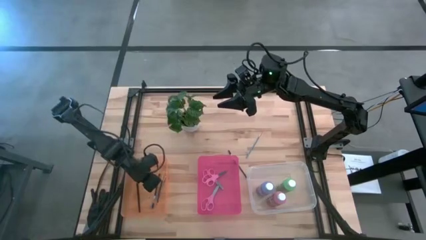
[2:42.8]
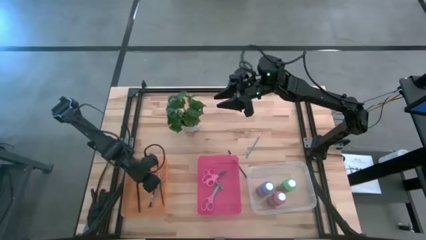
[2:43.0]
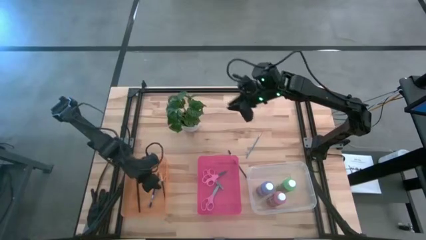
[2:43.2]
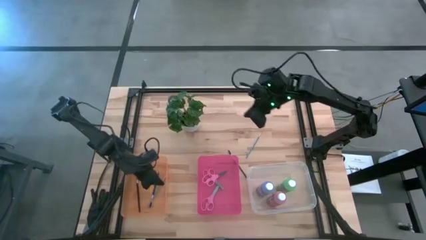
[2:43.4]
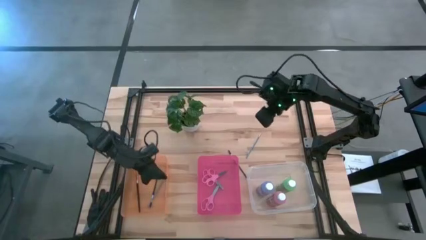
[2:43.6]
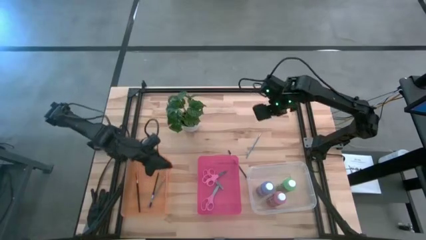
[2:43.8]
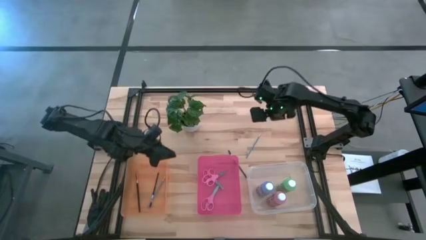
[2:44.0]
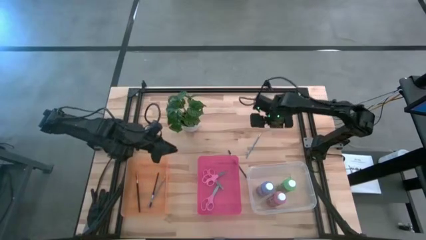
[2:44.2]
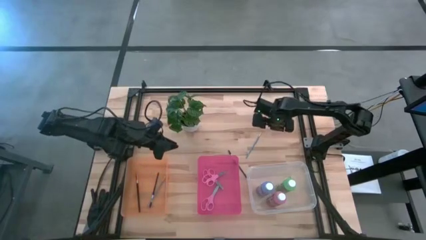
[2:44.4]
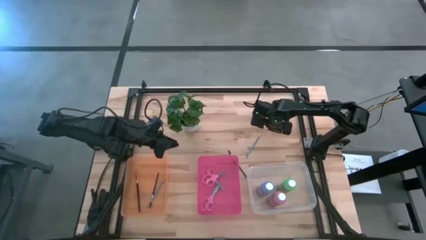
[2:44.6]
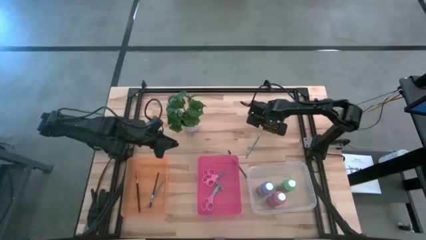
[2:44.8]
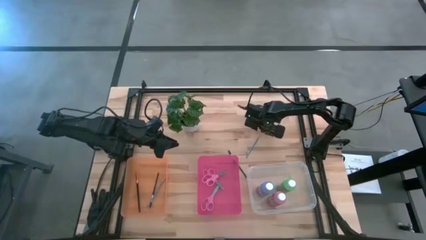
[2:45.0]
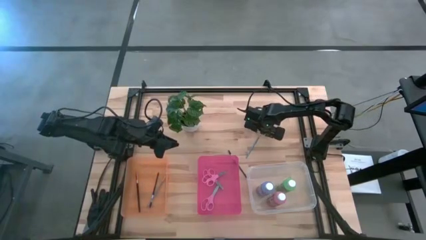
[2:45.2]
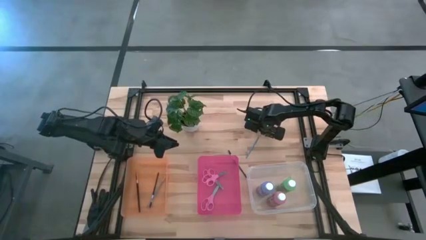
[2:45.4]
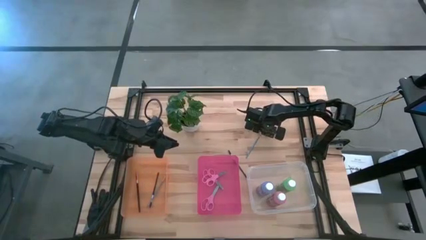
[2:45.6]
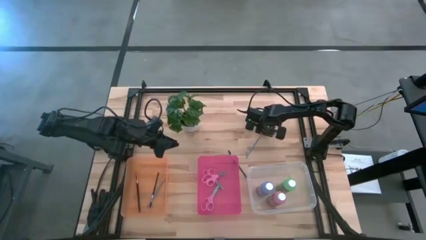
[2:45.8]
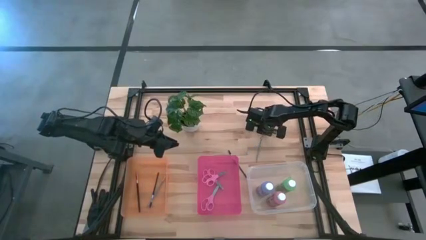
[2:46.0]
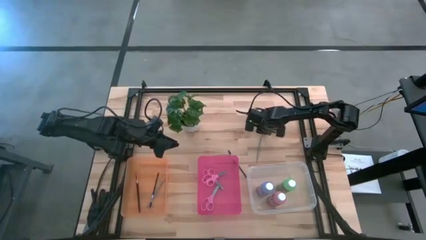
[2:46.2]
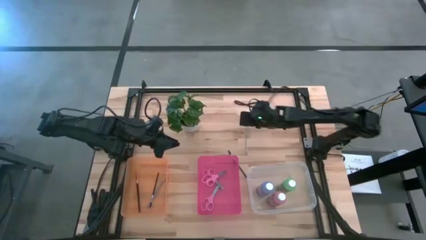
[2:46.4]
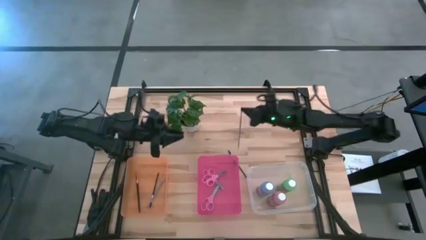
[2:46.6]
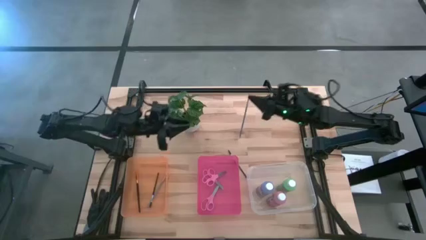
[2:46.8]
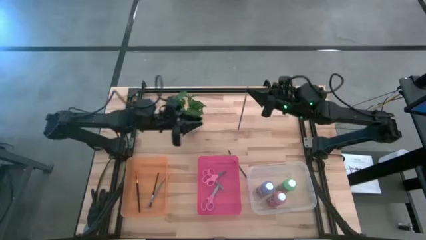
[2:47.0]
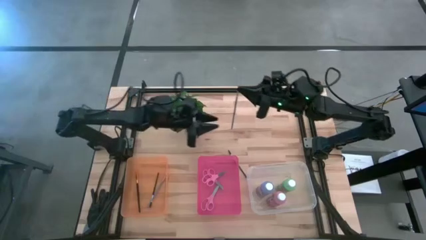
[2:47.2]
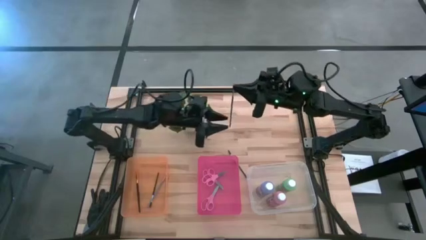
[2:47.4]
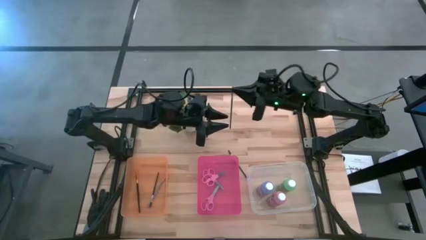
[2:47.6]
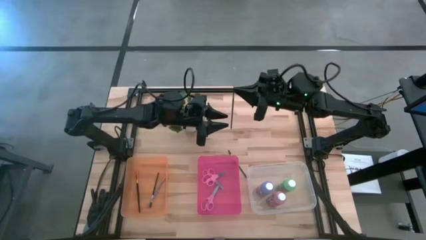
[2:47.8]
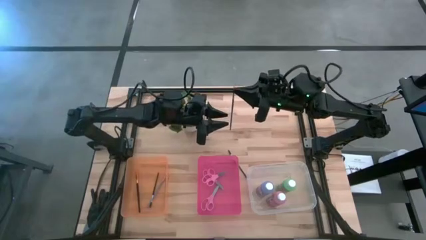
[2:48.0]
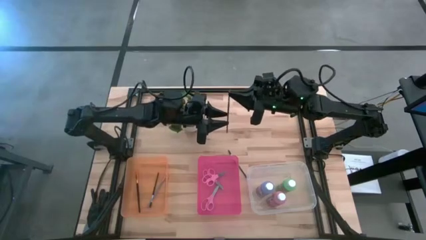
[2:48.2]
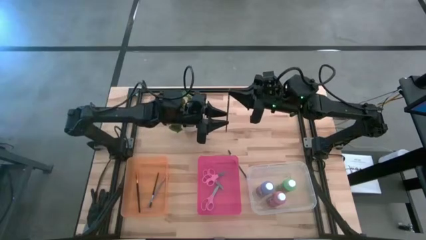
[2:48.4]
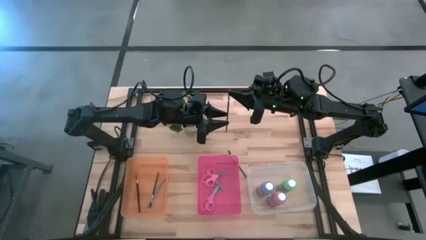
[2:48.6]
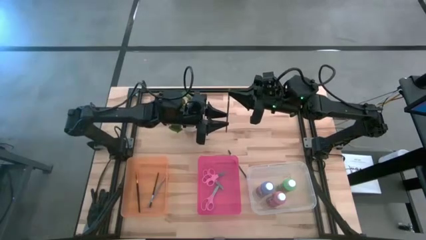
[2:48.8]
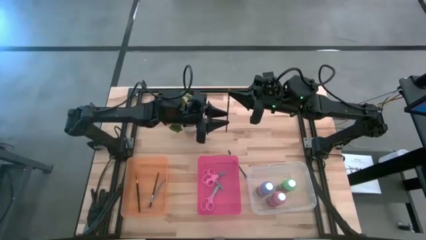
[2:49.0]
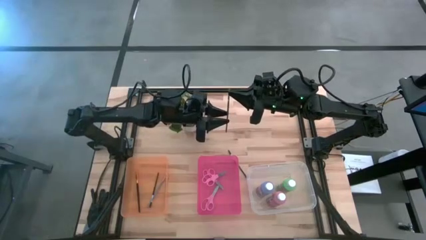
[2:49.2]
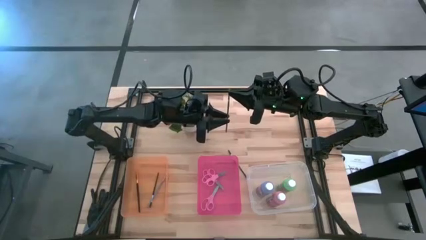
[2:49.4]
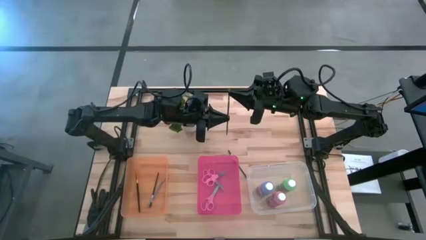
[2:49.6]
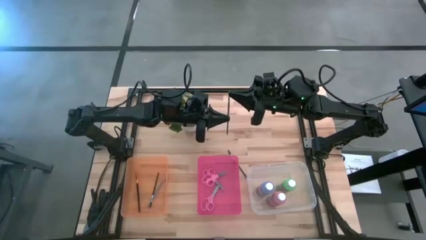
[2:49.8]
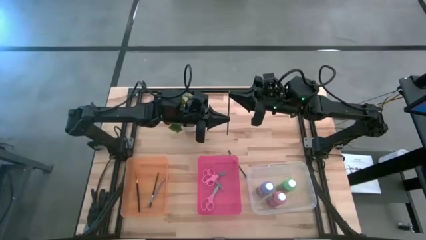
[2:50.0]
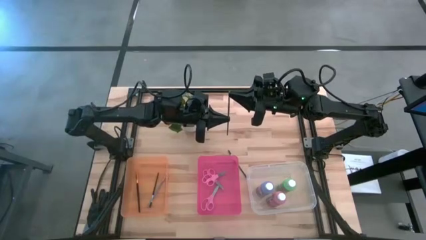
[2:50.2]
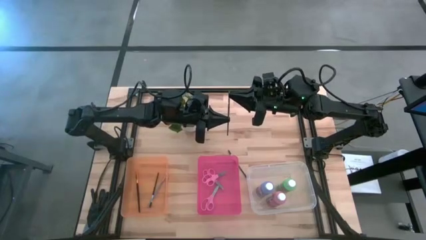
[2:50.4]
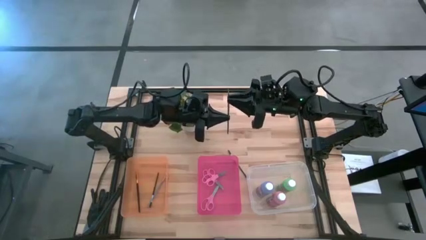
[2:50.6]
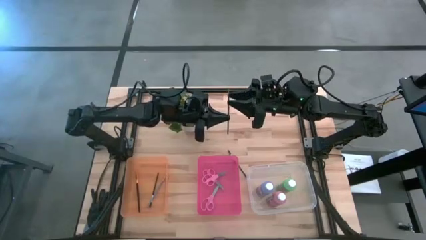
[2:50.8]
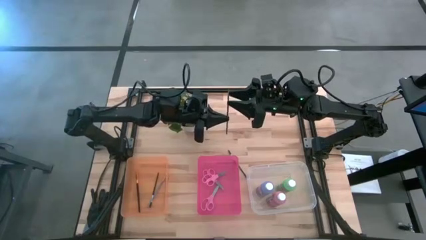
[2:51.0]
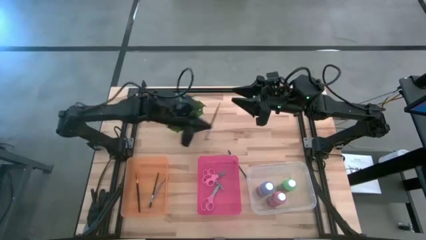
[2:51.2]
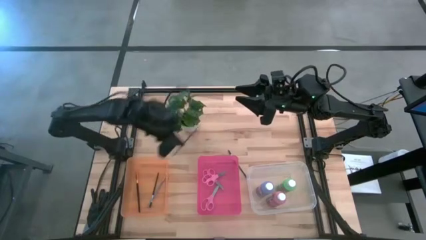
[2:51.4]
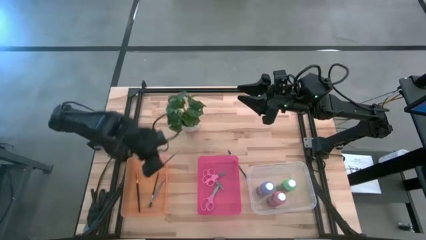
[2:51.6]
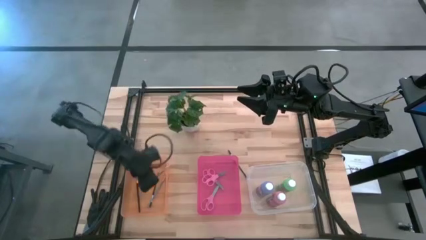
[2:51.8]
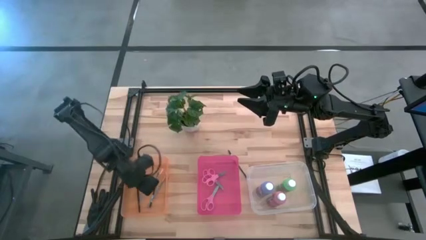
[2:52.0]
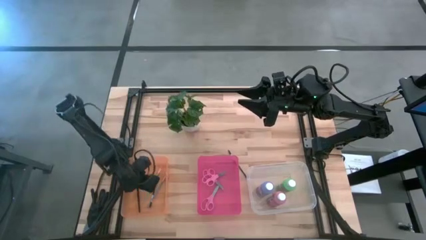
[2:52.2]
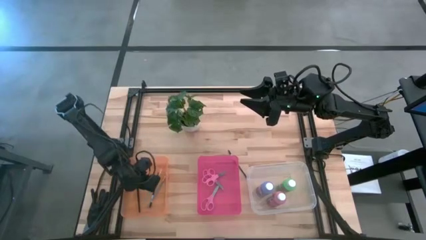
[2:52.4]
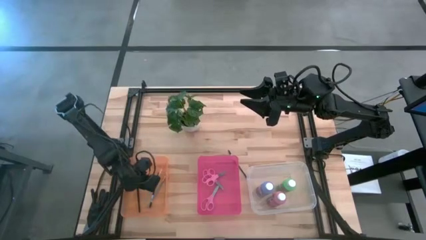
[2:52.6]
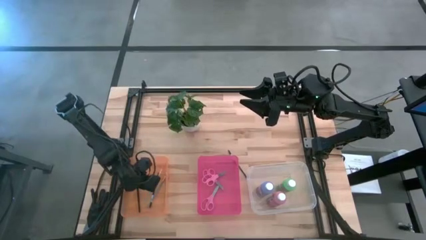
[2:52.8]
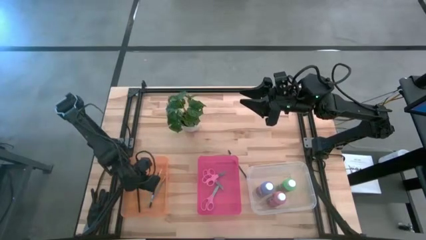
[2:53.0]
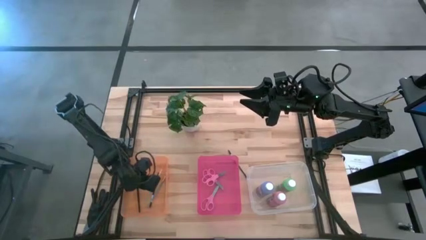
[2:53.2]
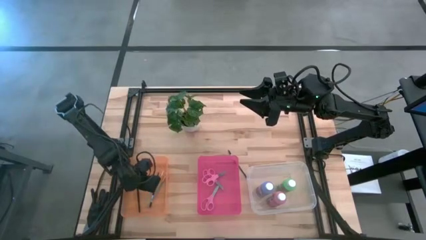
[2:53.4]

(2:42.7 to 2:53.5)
Task: Pick & Place Paint Supplies
Put the blue paintbrush into the orange bin

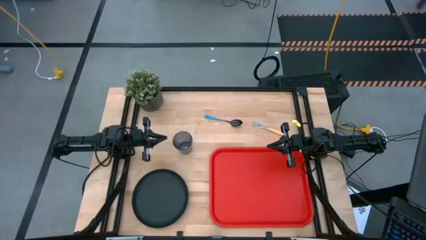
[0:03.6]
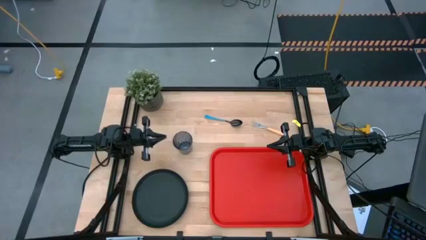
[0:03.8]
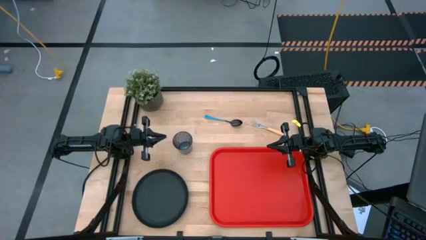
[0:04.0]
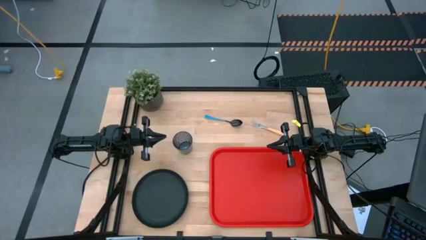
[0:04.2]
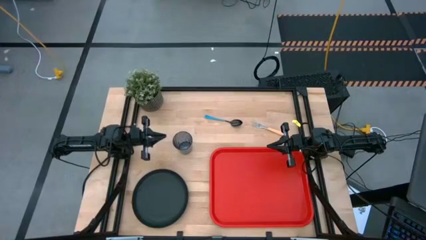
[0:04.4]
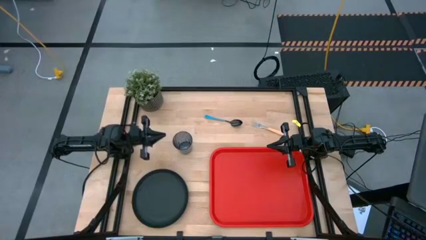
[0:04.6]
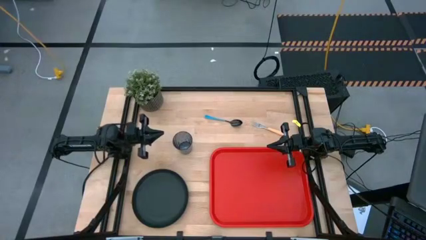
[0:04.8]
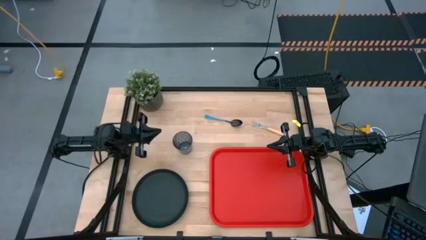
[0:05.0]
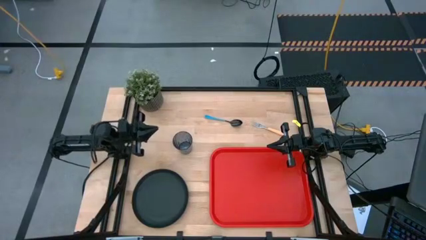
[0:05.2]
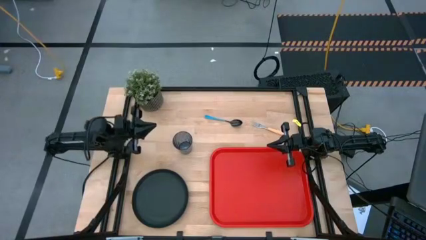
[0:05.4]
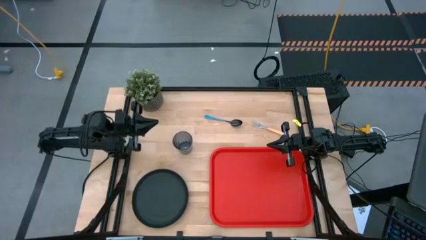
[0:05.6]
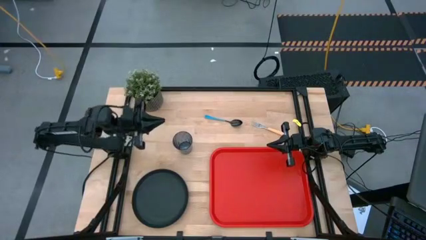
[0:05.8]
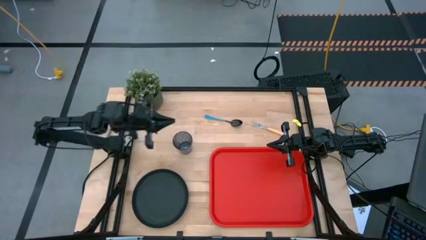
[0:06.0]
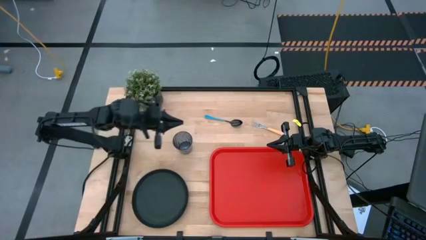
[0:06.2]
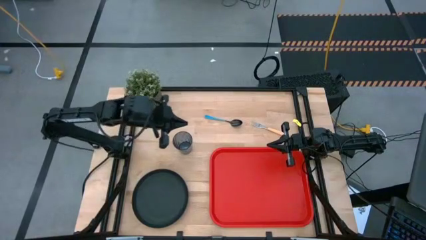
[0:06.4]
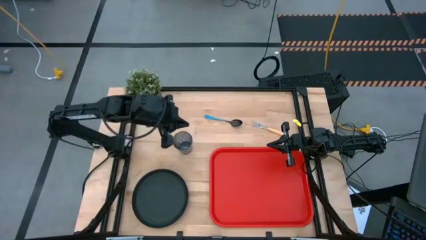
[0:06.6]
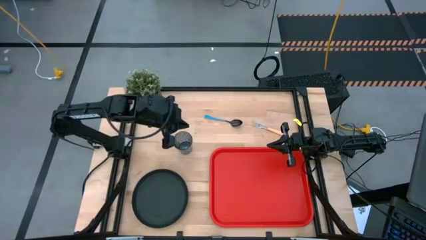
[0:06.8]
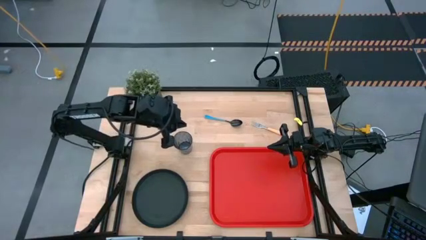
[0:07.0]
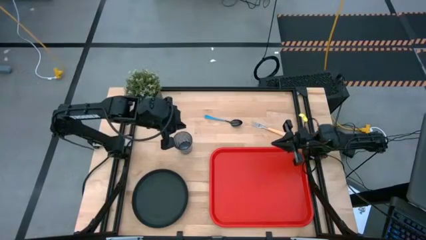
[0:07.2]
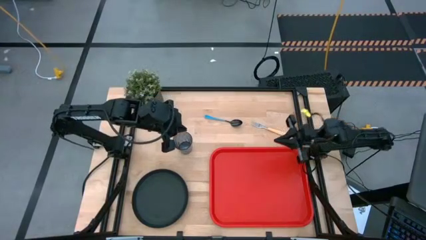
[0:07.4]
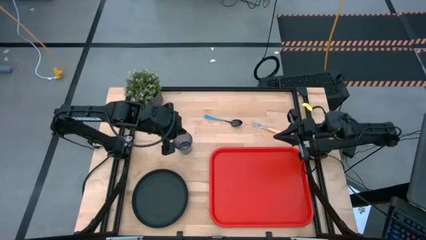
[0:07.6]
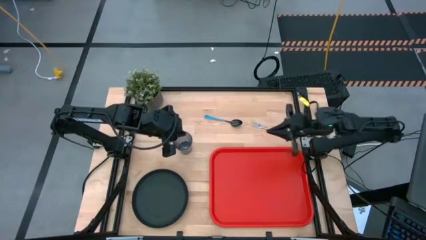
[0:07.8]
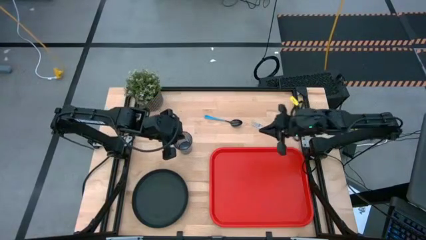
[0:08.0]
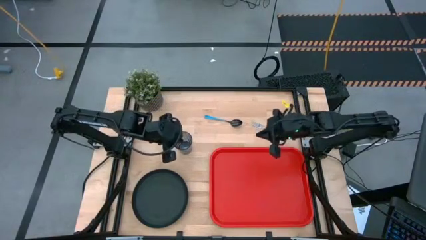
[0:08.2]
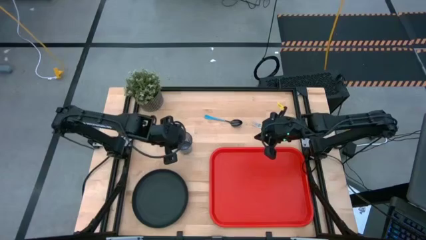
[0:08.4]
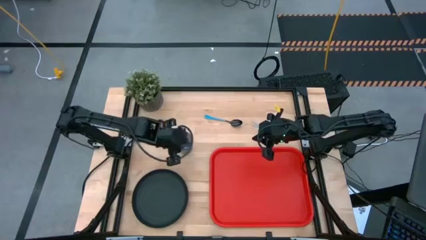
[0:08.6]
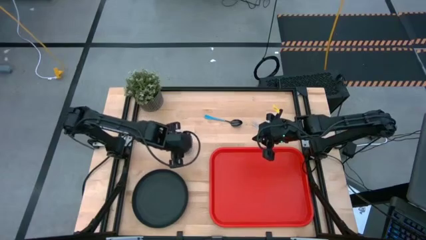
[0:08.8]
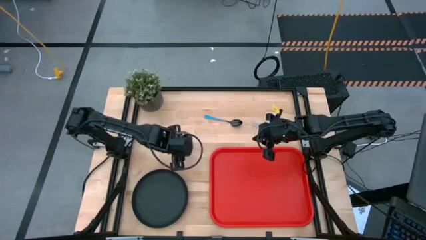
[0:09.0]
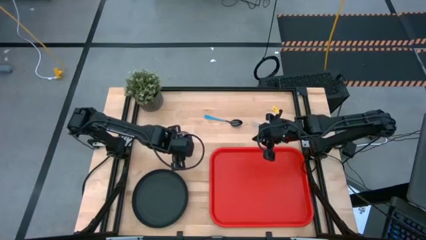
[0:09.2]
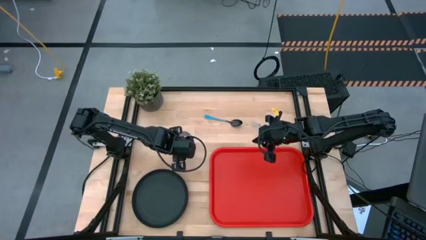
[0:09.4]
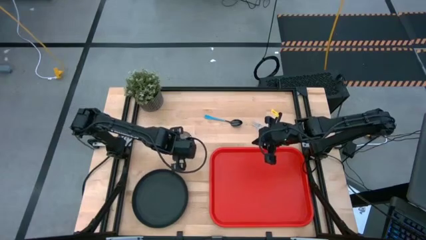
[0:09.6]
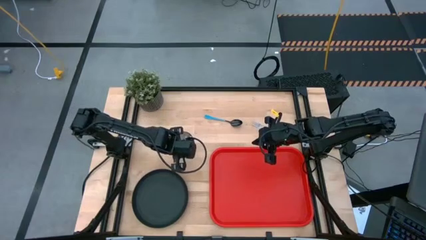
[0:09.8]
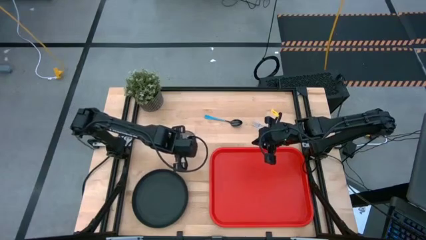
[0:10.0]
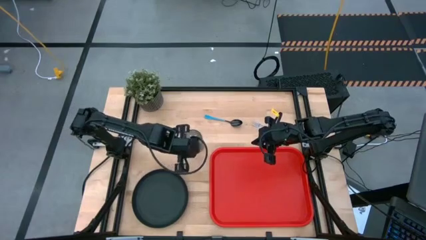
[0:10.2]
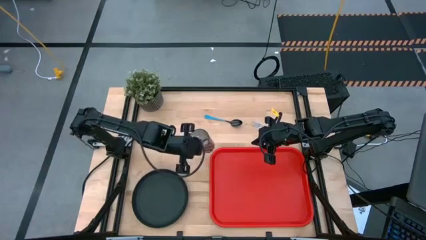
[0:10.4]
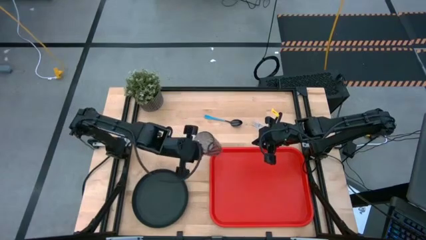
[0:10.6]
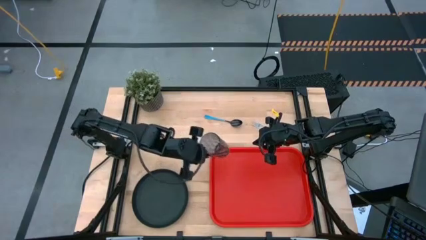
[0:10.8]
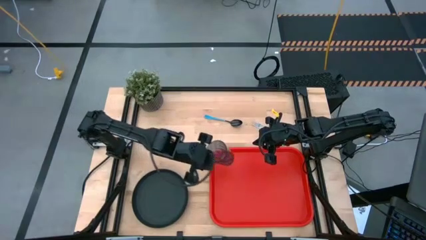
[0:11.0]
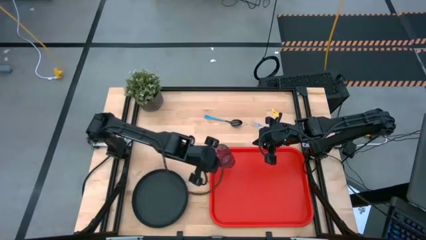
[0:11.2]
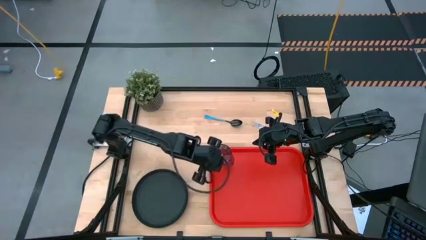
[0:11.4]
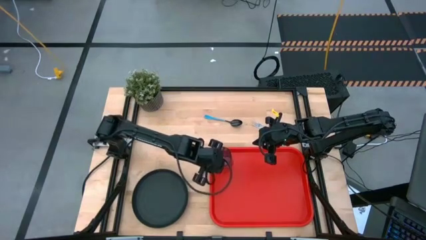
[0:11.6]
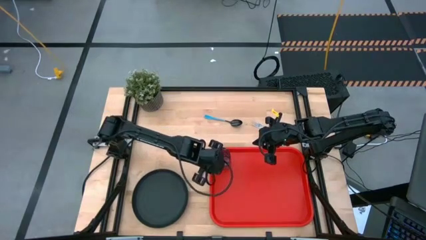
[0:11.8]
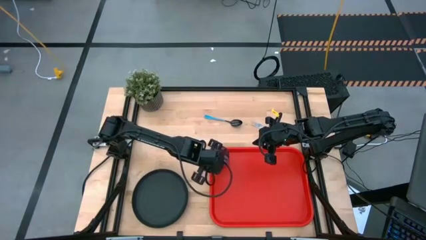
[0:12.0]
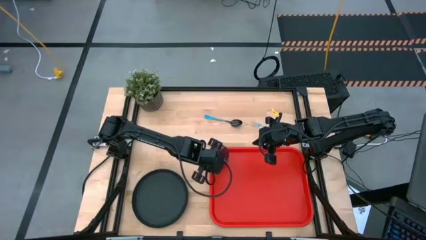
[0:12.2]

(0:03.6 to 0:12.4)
Task: Pick and place plate/cup/fork/spoon on tray
Put the black glass to the top left of the tray
